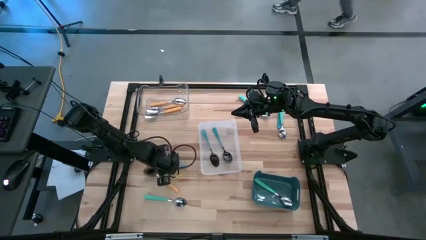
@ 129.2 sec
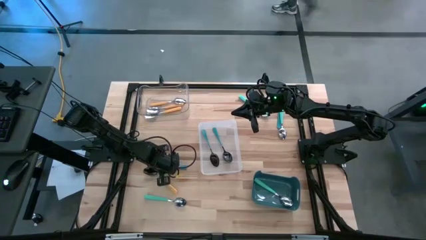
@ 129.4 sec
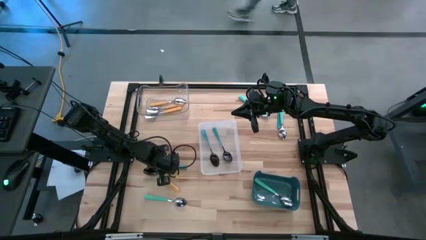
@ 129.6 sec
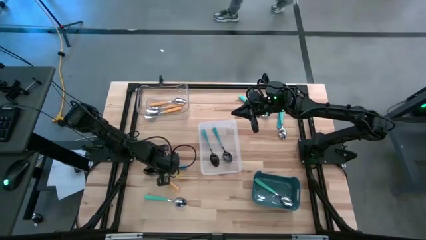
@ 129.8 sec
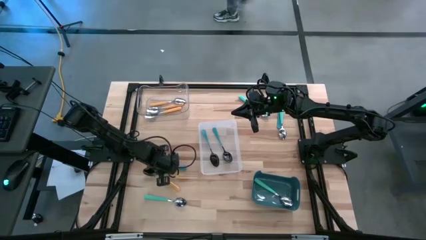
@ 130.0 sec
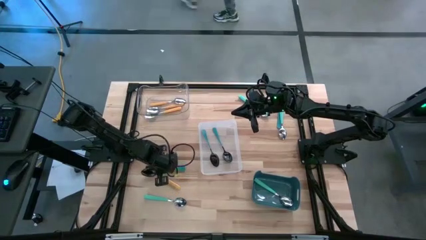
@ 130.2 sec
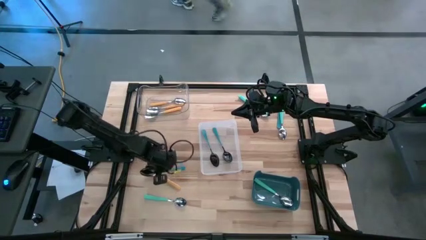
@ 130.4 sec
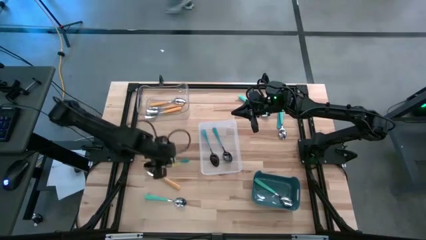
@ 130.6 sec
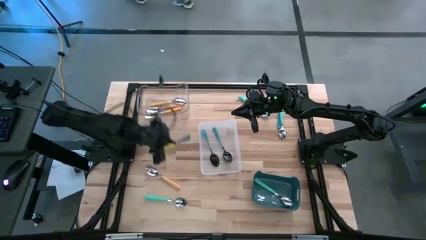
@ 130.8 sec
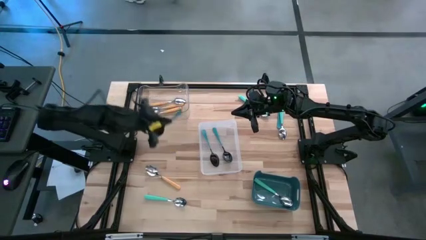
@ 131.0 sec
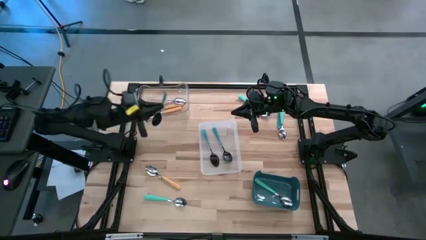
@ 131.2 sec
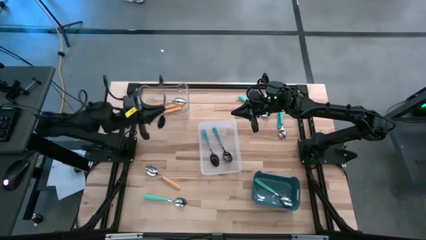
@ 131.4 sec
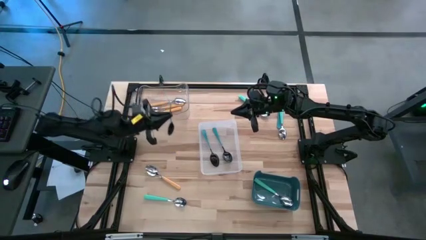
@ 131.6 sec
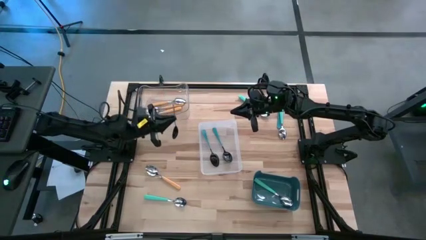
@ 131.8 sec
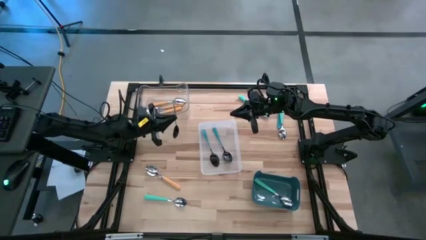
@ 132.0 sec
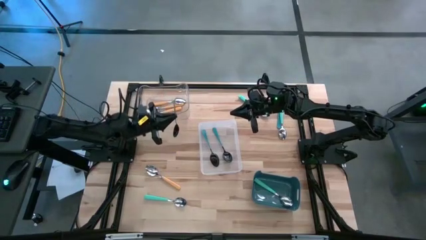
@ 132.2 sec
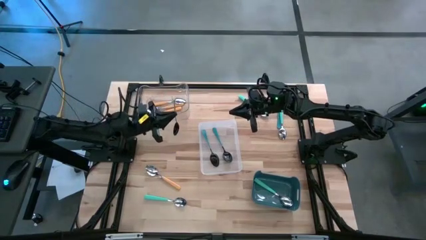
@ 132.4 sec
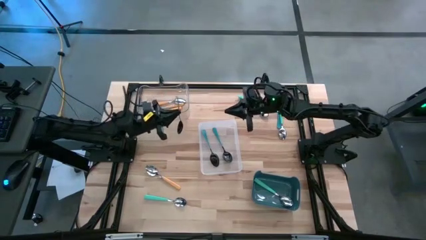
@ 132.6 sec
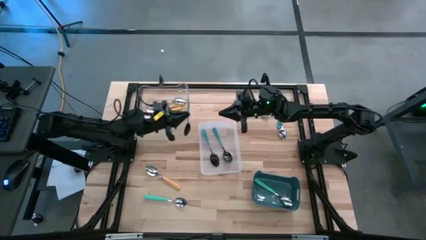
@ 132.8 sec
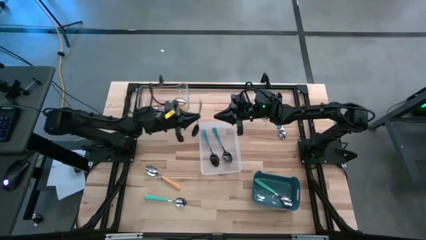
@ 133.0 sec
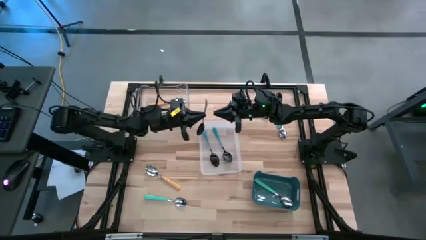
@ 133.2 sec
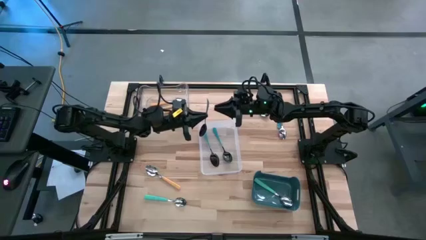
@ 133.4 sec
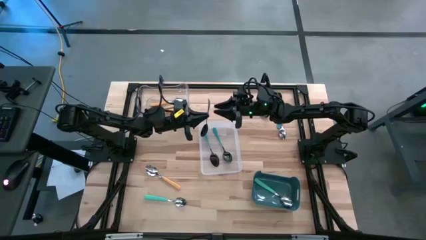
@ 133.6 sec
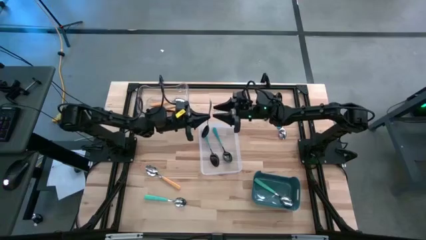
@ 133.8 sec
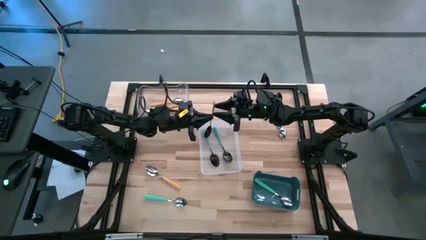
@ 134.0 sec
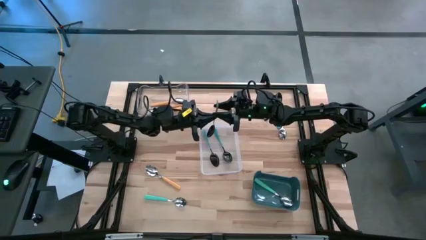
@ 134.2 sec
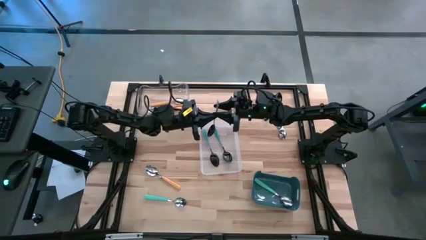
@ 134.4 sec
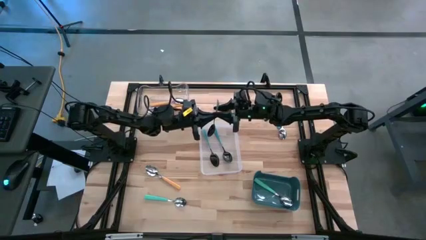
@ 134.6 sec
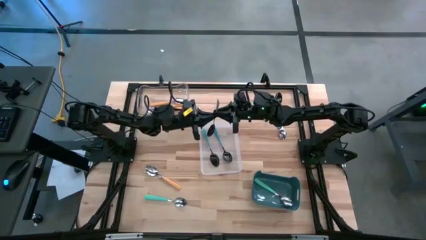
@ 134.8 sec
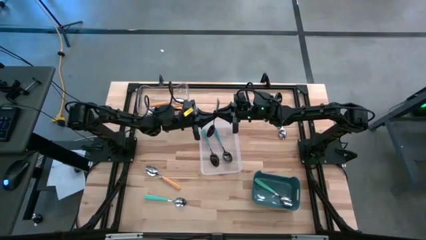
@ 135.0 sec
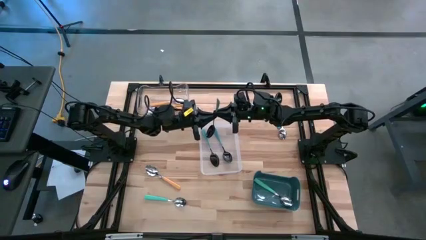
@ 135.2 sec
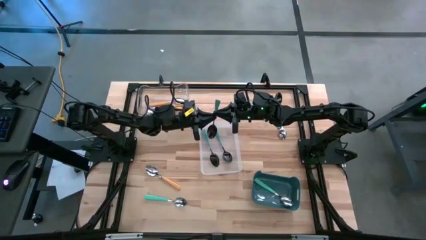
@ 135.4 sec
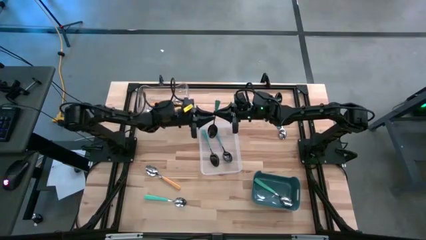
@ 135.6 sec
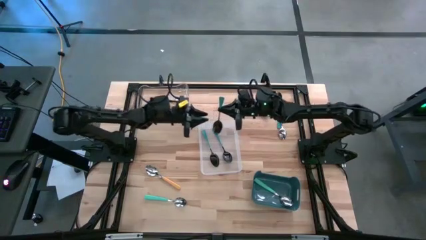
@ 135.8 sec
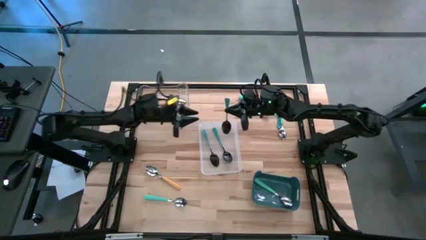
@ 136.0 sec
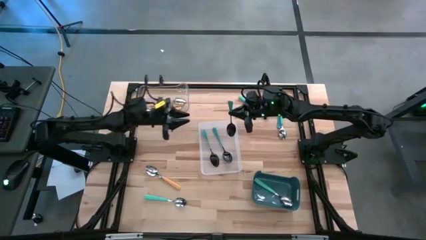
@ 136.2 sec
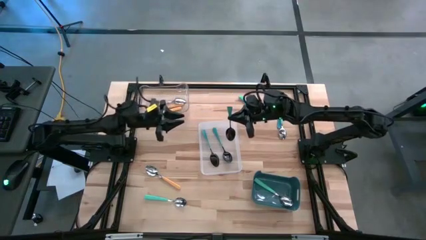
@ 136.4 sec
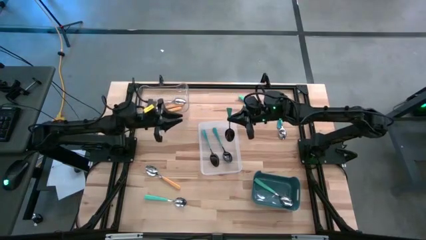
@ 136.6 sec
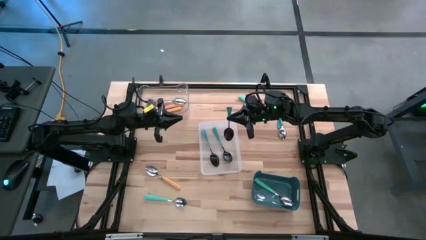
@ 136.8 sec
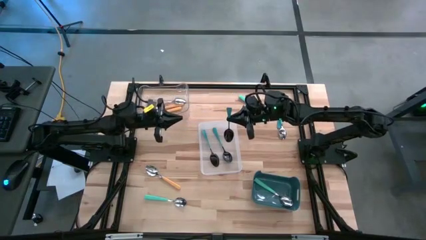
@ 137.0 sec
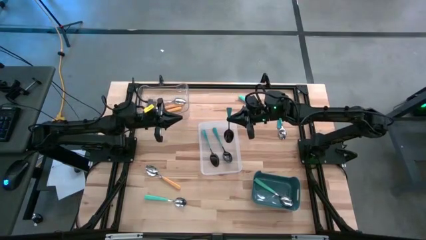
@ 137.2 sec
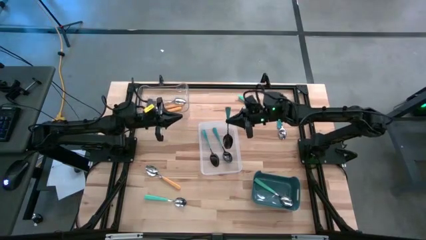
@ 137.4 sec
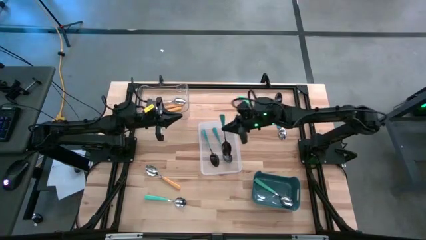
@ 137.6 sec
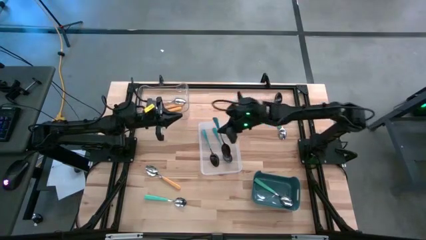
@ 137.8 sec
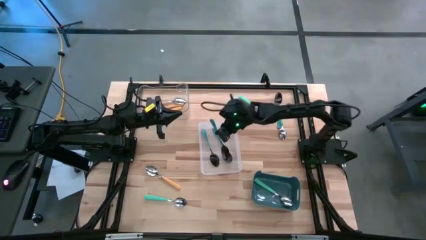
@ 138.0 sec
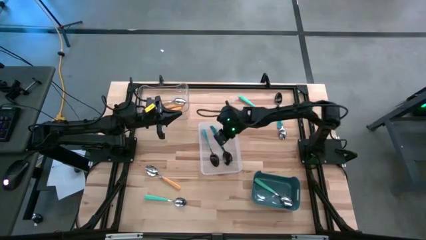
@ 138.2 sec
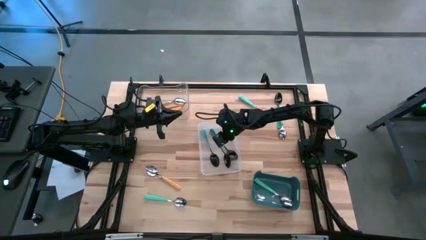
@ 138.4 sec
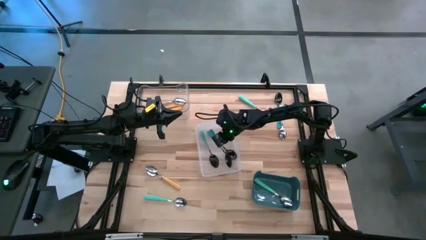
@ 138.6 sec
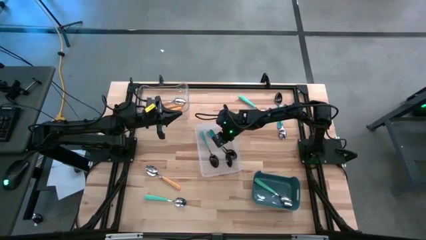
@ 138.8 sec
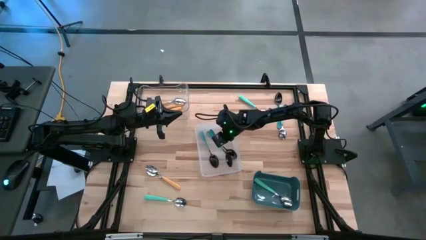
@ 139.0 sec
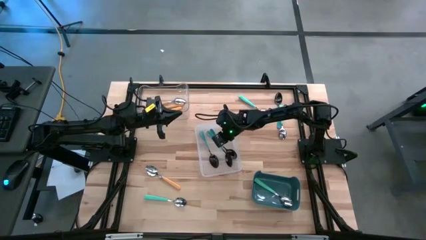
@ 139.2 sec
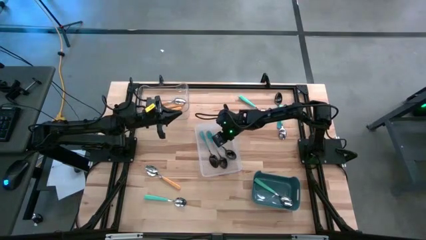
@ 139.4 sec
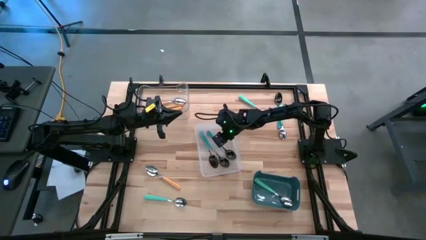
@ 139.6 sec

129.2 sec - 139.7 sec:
Task: Sort silverware by color (type)
Put the blue spoon into the white transparent bin
